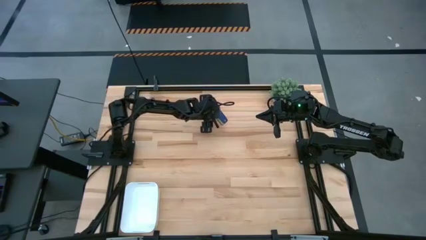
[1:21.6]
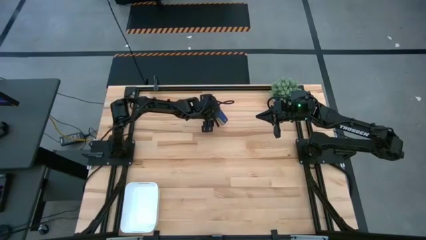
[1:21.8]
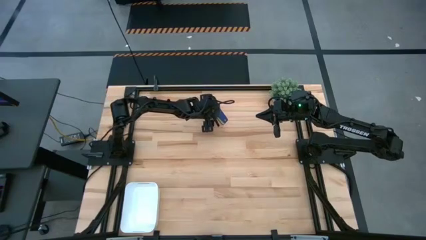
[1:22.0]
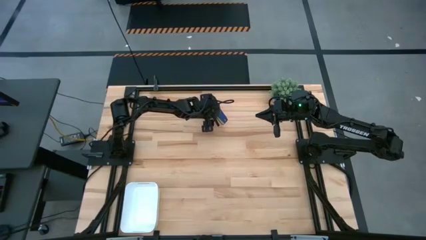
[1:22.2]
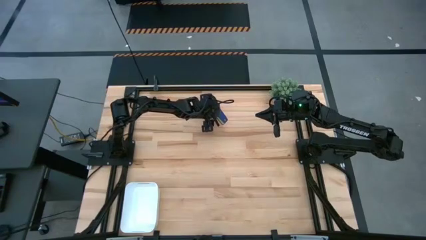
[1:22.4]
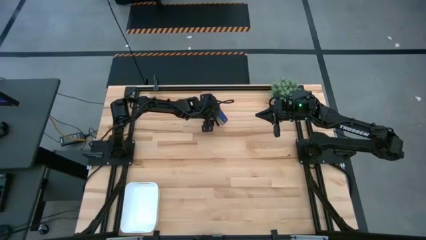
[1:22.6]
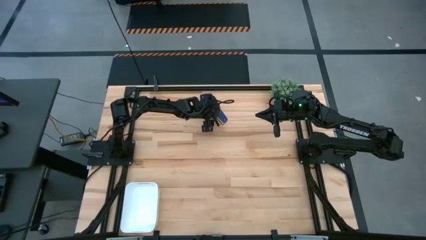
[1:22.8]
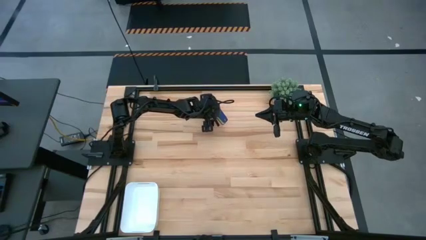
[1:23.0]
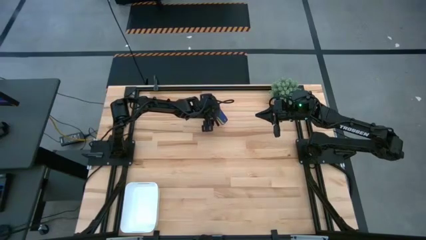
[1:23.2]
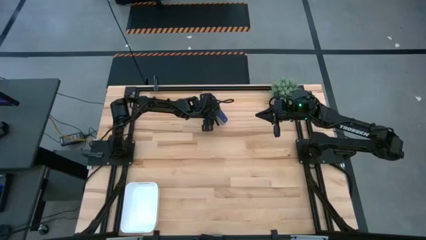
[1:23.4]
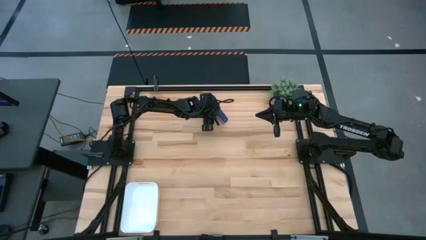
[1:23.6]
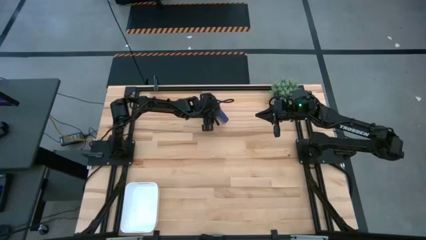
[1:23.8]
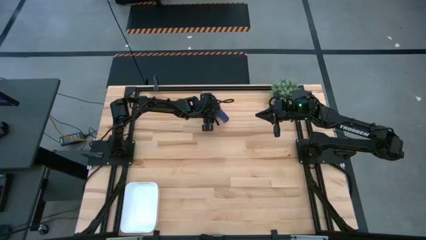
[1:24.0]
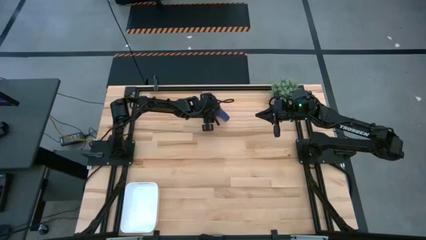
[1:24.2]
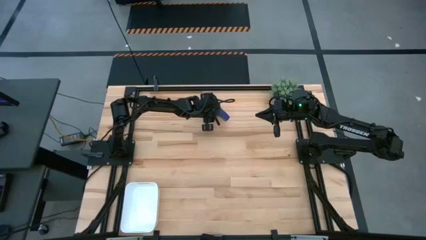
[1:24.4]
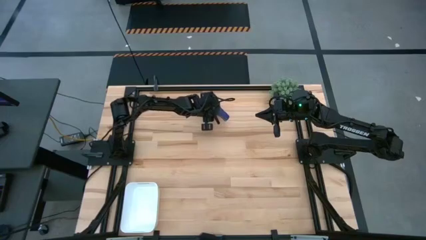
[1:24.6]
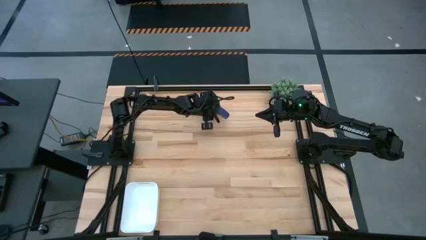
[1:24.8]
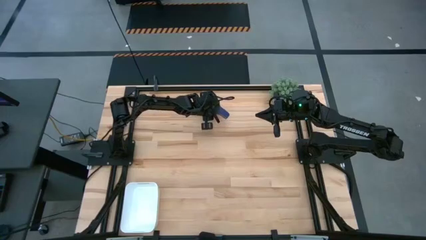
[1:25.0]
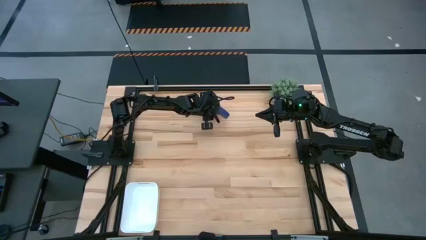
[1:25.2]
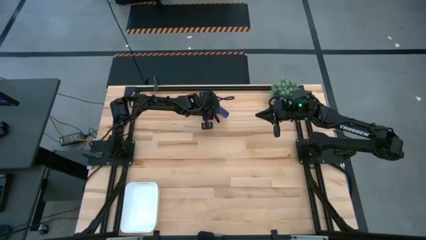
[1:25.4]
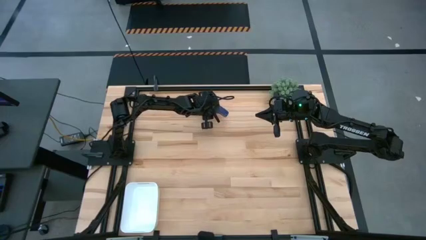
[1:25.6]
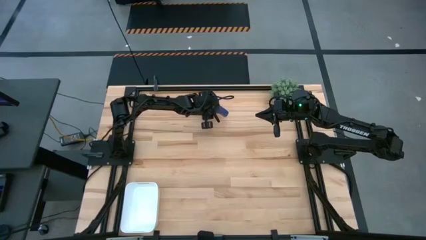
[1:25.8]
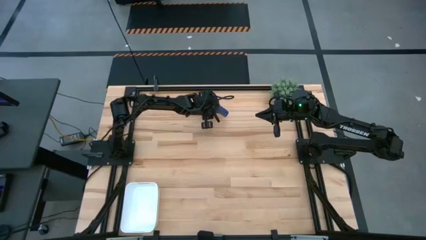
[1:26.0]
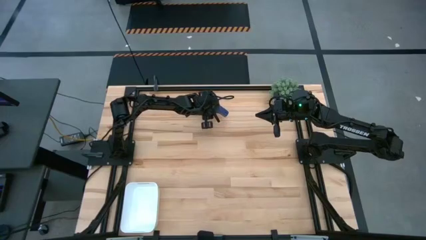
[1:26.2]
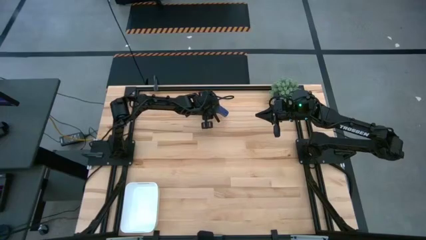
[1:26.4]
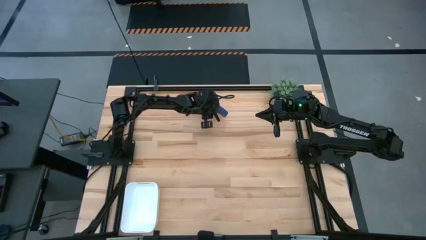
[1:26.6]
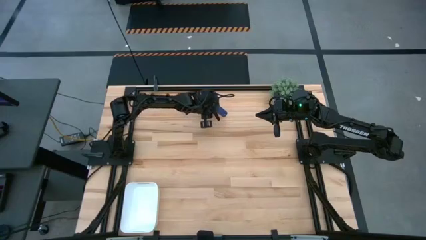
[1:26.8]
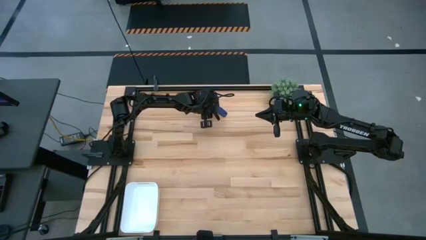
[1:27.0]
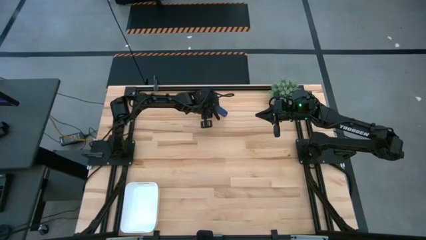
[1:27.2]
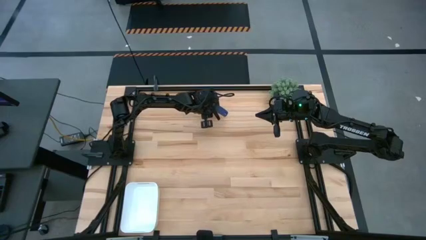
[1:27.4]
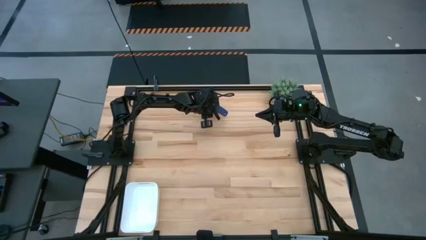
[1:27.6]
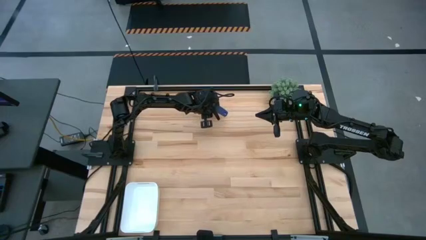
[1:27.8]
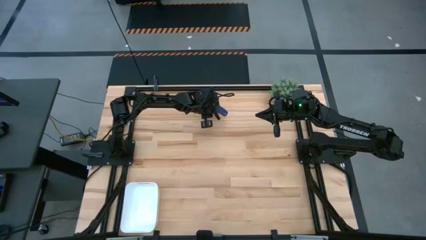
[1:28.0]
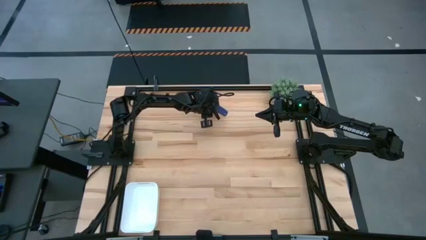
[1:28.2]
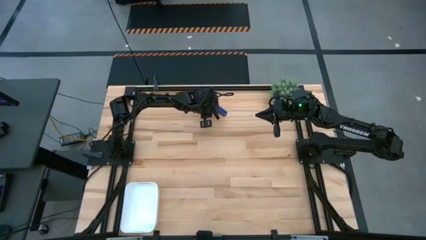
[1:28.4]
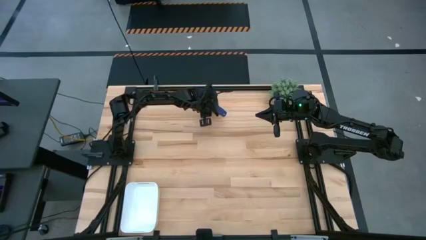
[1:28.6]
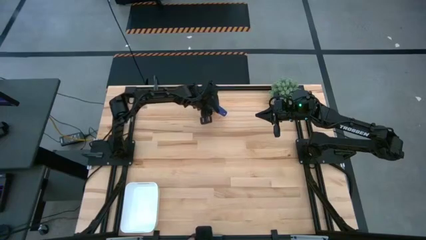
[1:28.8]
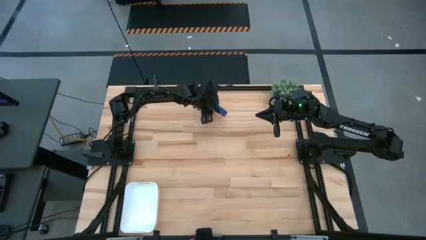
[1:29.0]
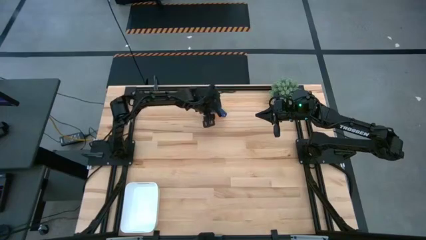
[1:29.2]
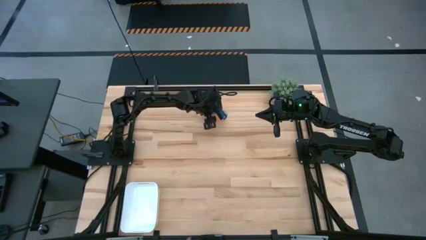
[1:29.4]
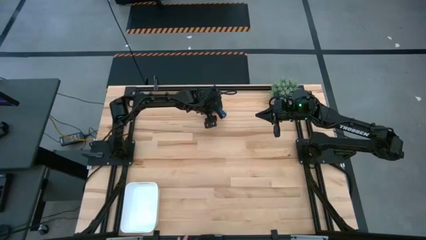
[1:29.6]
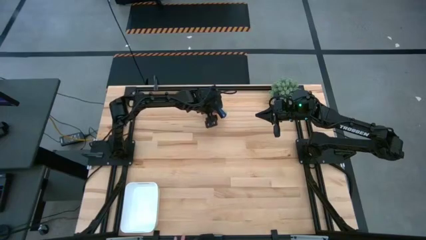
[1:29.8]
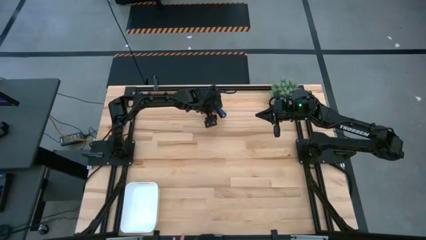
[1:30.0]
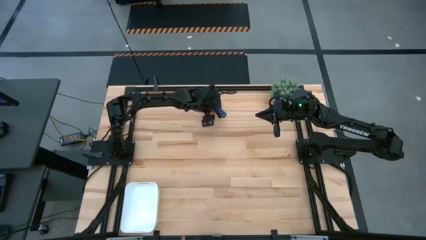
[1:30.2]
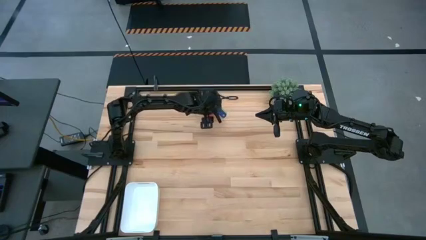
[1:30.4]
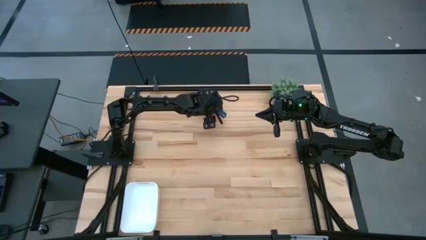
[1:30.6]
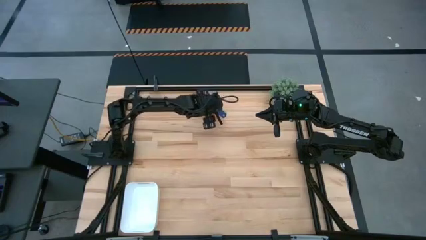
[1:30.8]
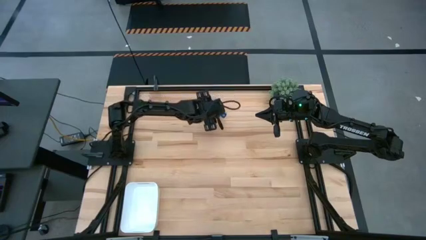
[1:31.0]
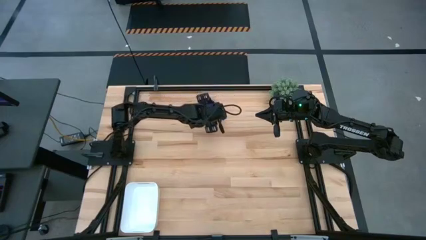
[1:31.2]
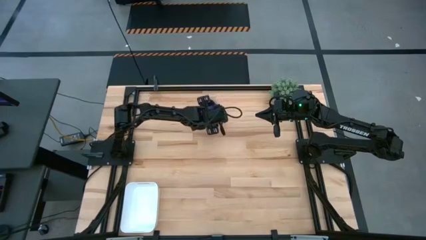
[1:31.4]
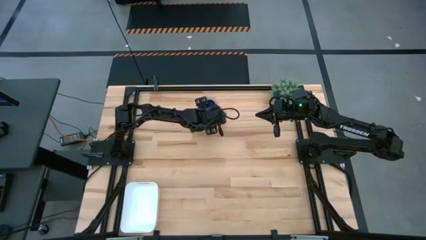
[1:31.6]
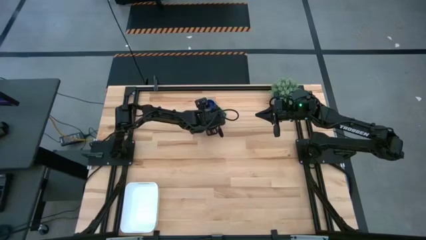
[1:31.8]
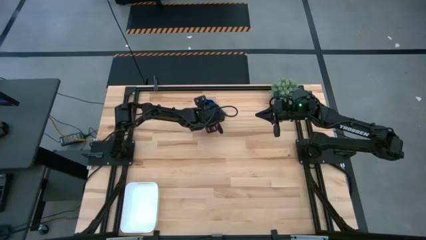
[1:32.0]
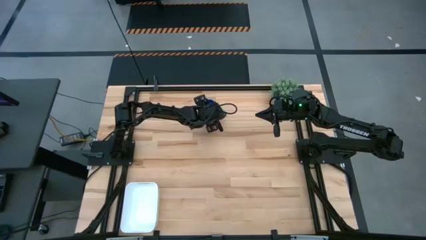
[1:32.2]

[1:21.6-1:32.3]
Task: Nest measuring cups in basket
Put the stacked measuring cups into the white bin
